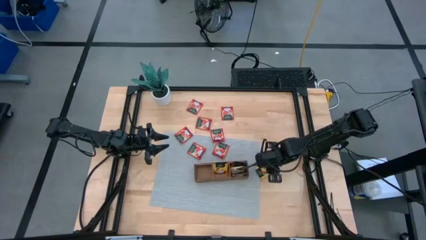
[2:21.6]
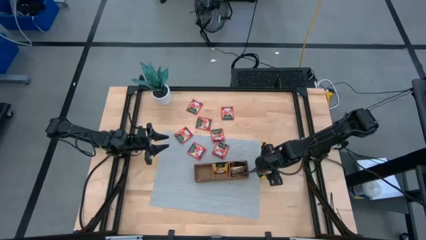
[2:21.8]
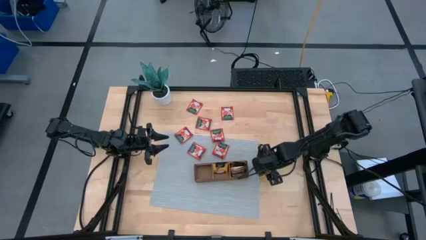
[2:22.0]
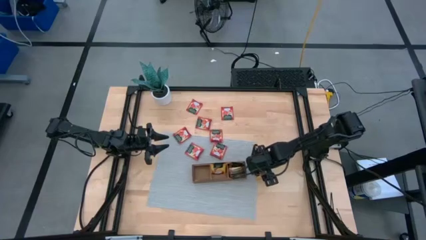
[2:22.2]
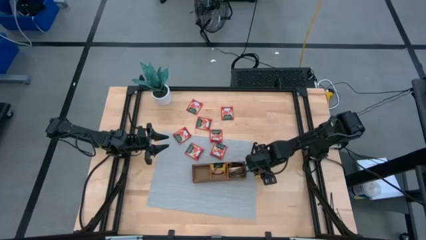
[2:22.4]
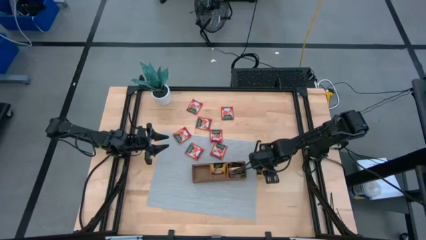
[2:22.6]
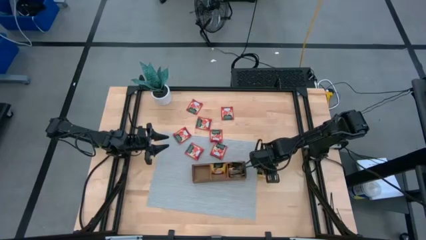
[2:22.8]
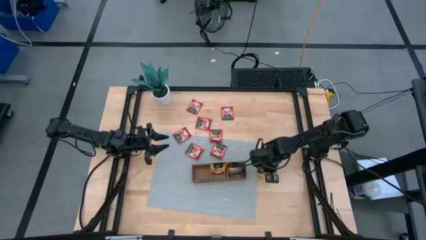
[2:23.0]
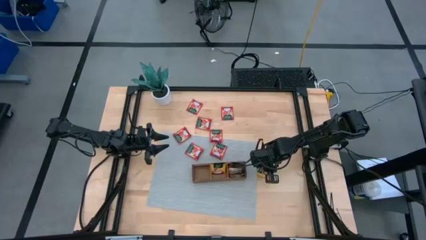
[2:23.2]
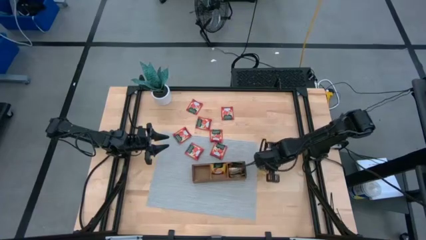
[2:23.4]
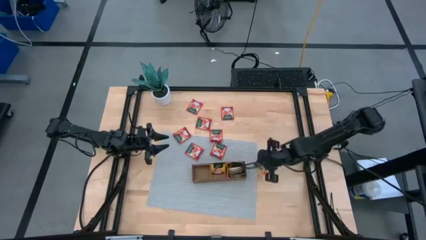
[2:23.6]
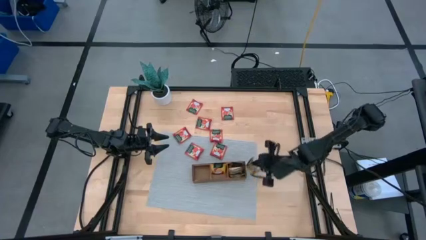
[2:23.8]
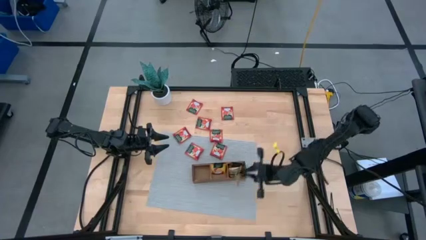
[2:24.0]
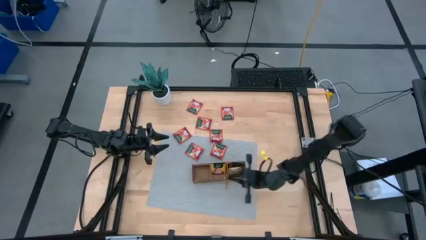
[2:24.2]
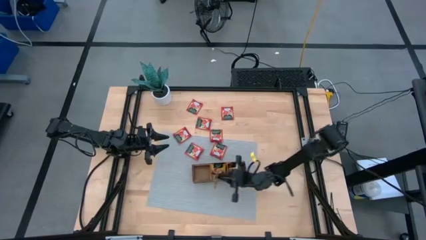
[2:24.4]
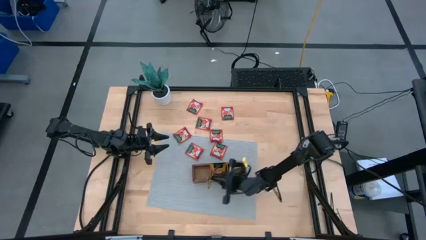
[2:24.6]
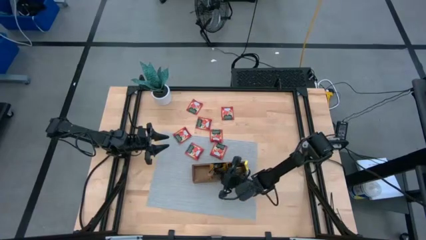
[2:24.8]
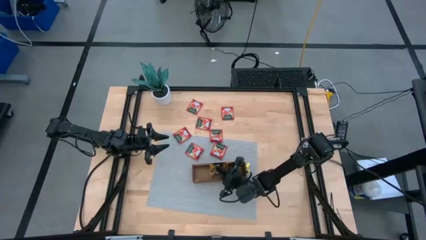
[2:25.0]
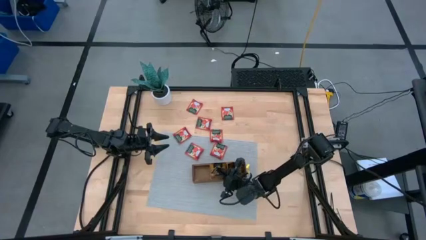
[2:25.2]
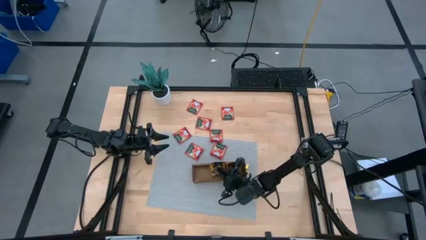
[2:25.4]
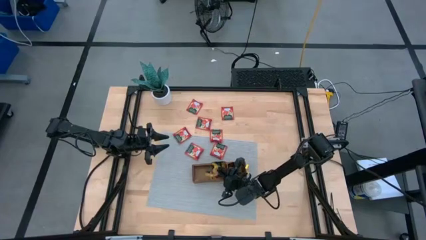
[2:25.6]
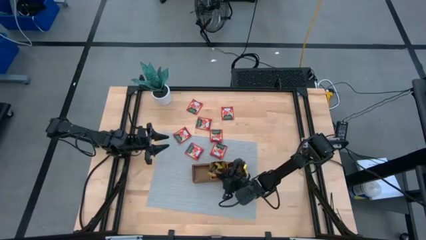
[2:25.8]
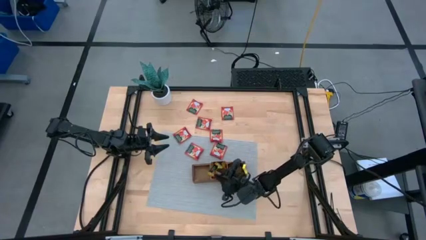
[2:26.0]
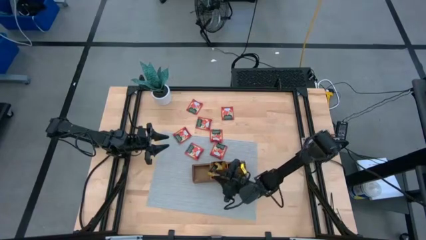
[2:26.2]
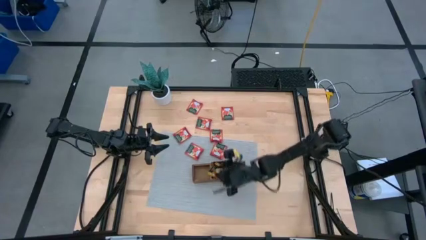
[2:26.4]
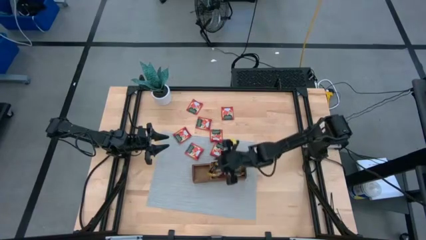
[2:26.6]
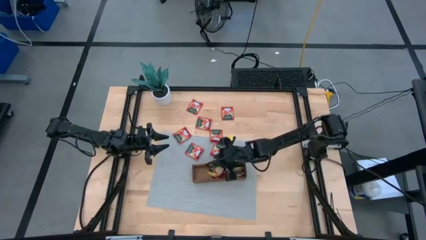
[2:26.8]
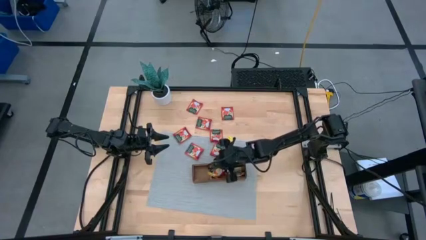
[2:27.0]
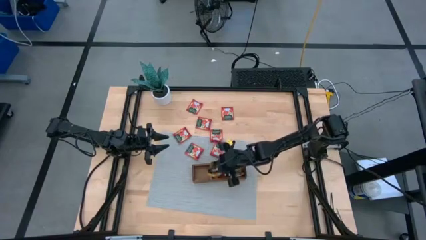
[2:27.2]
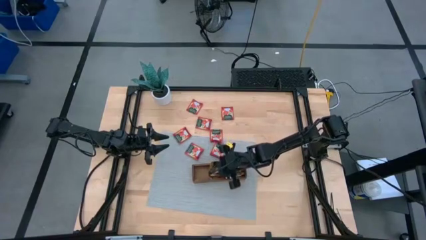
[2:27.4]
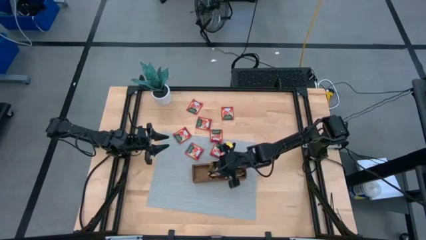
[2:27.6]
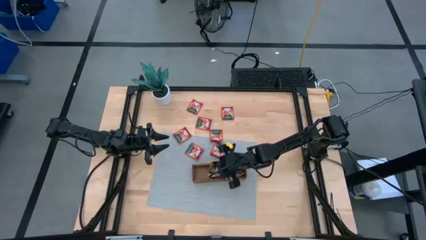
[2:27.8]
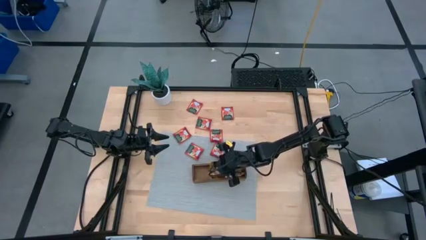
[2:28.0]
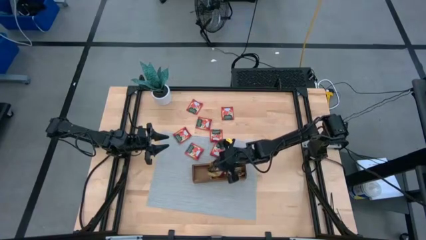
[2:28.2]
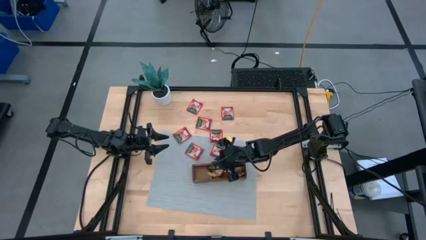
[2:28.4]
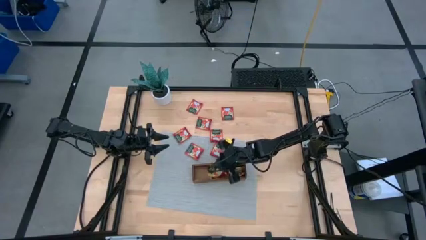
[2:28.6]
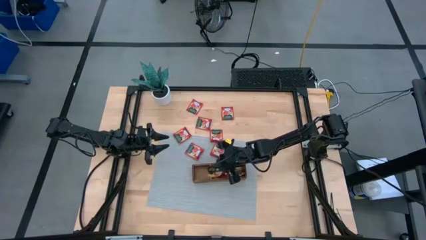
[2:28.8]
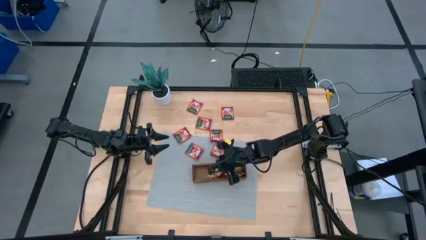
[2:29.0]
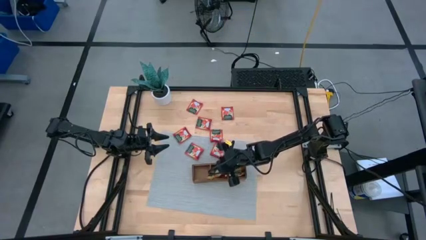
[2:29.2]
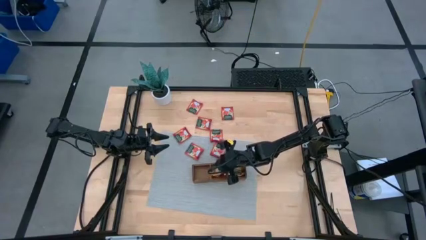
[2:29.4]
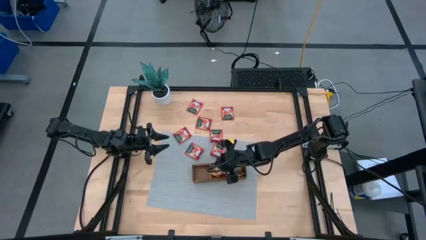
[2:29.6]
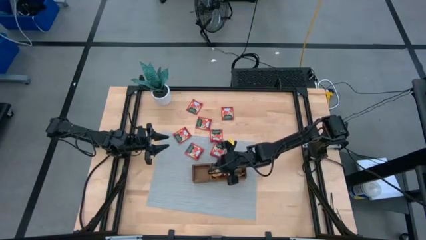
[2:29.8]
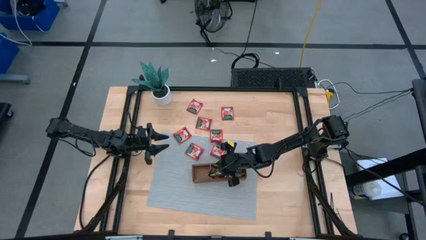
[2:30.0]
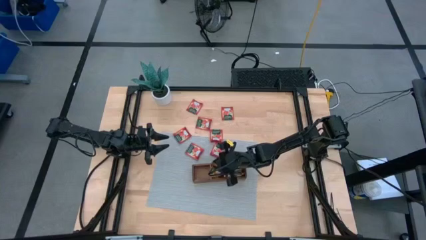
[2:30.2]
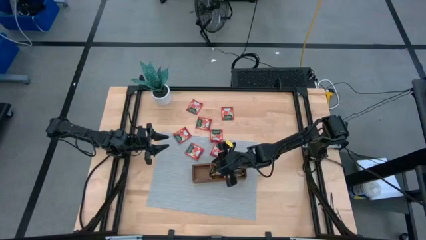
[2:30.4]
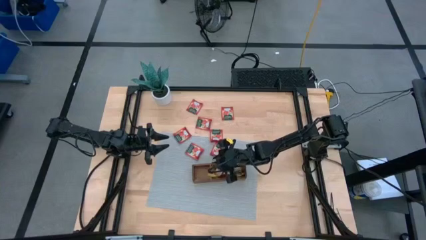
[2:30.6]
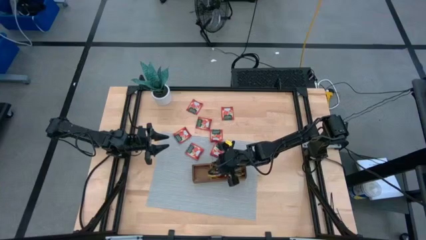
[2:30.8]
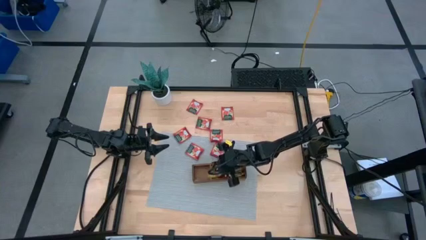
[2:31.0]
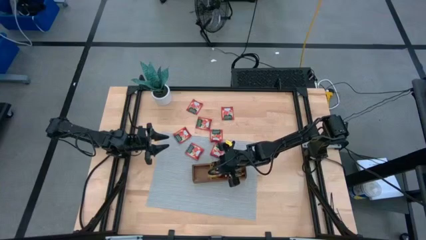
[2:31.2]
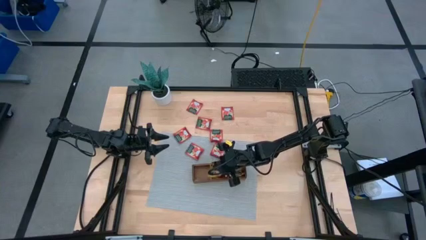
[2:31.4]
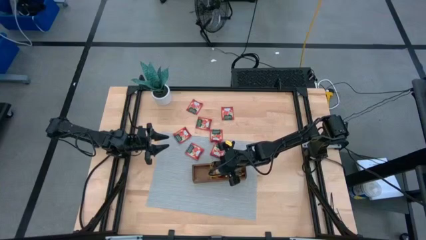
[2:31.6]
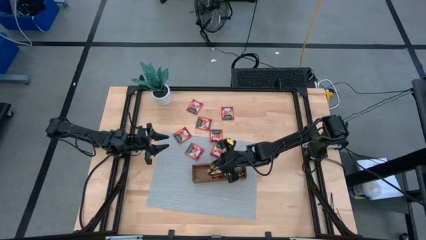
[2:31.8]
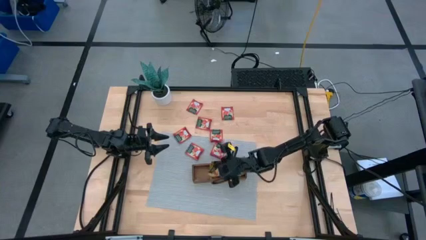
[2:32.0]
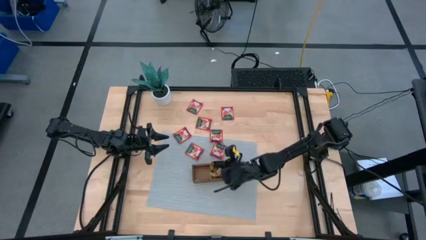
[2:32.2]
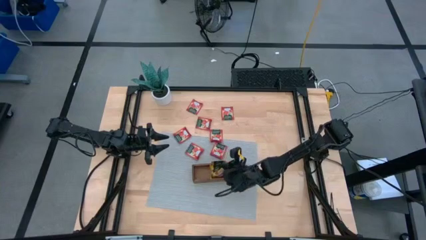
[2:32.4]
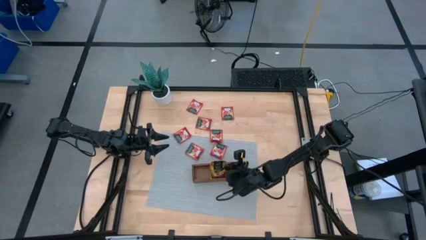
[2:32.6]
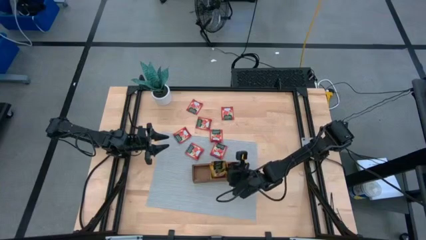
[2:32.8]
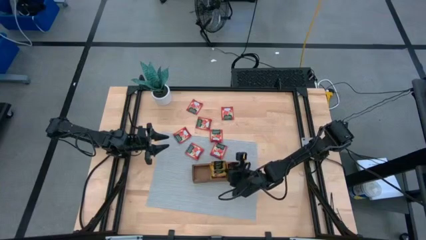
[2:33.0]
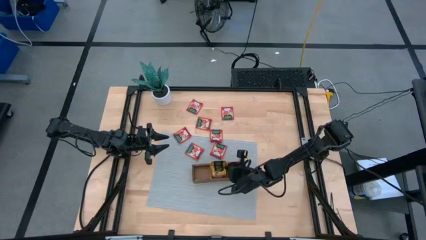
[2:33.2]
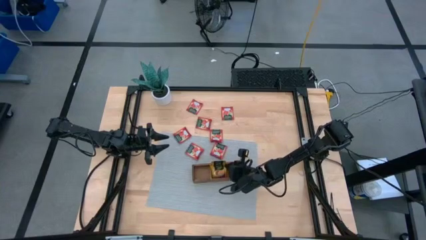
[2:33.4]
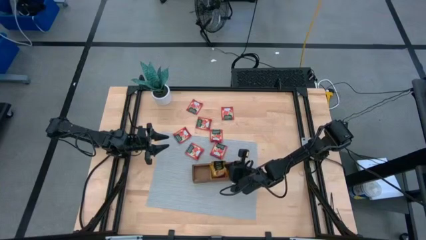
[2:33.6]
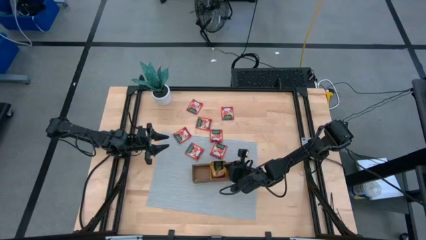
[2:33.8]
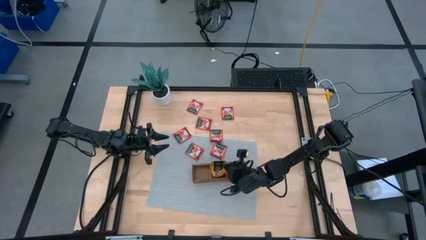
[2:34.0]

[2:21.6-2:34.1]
Task: Pick & Place Tea
Put the yellow tea bag into the middle compartment of the wood organizer

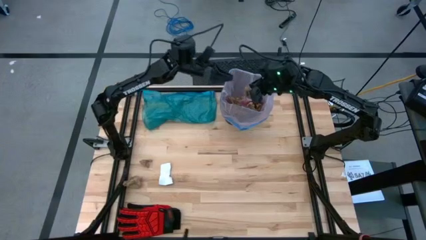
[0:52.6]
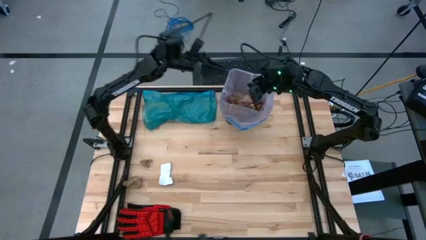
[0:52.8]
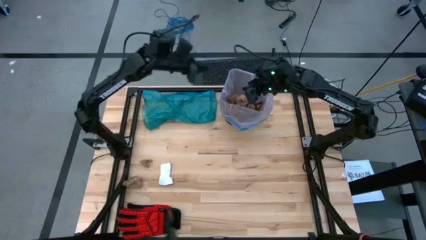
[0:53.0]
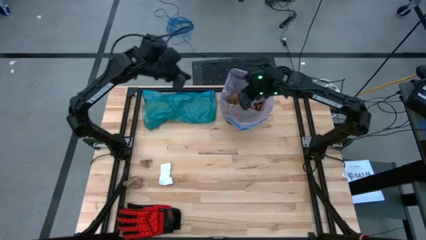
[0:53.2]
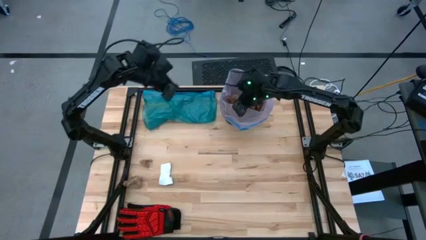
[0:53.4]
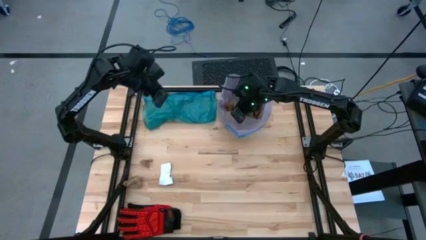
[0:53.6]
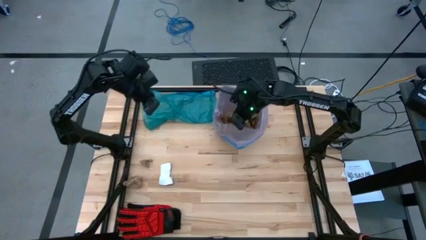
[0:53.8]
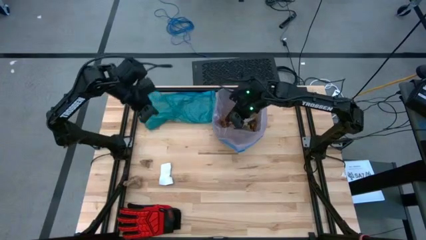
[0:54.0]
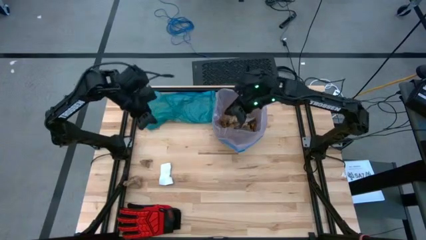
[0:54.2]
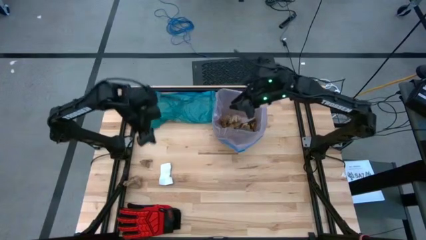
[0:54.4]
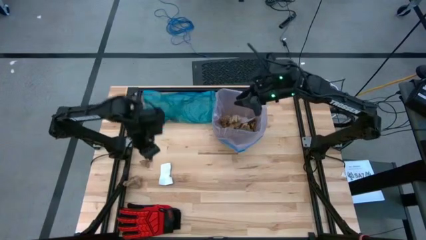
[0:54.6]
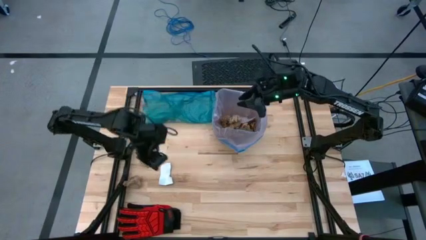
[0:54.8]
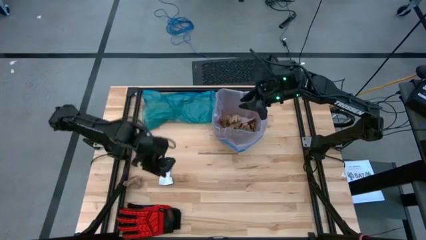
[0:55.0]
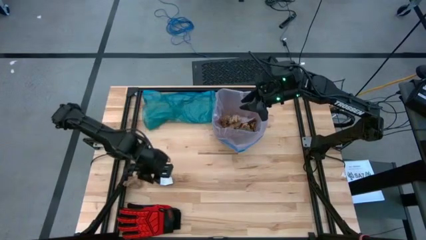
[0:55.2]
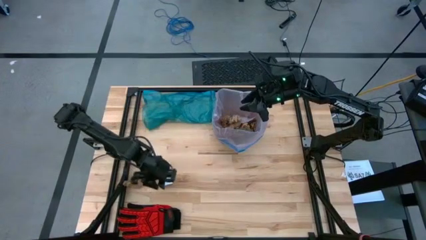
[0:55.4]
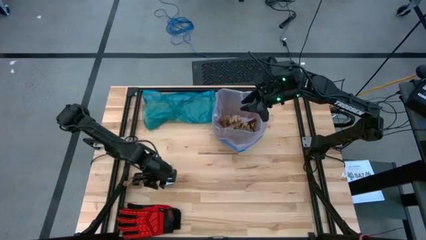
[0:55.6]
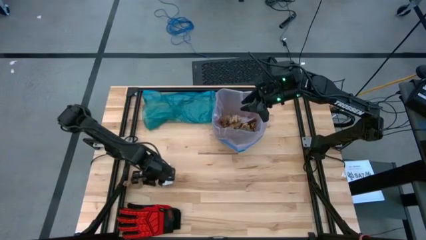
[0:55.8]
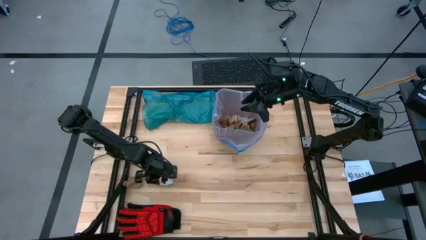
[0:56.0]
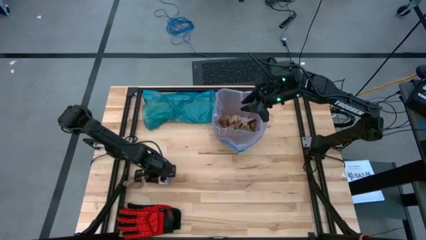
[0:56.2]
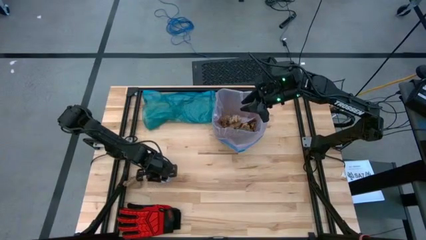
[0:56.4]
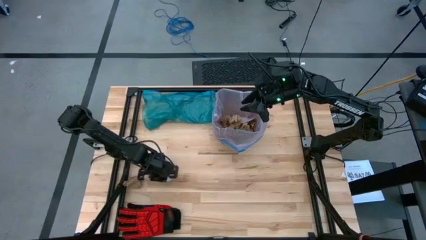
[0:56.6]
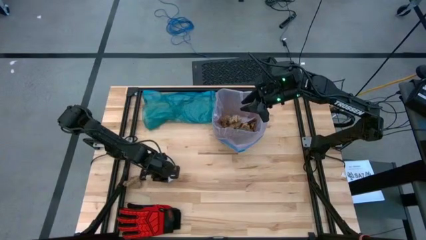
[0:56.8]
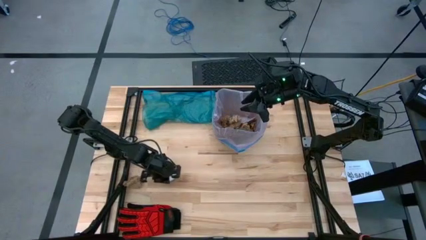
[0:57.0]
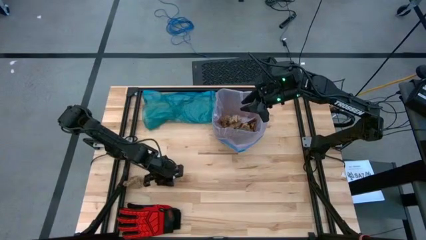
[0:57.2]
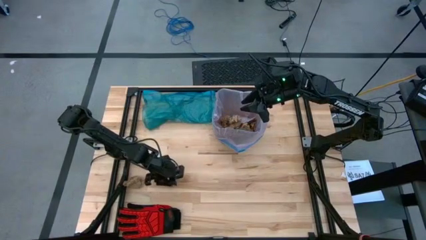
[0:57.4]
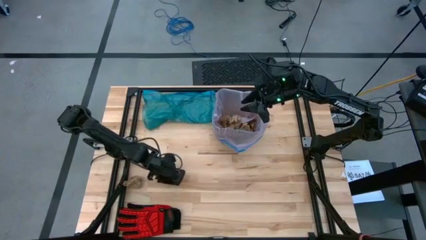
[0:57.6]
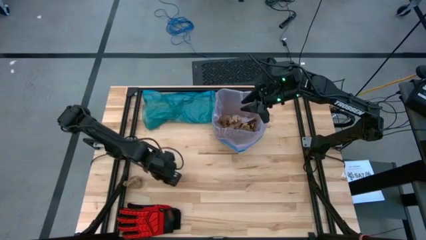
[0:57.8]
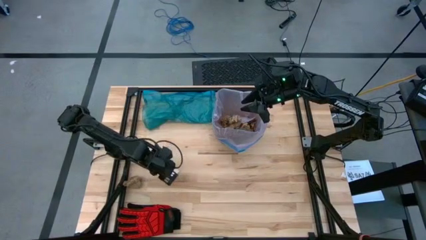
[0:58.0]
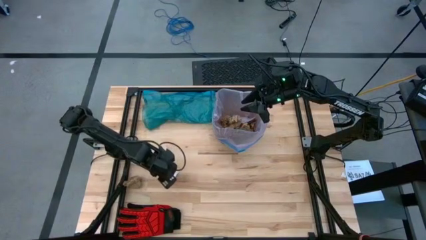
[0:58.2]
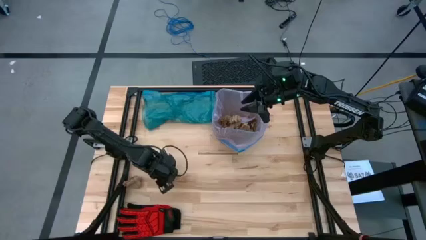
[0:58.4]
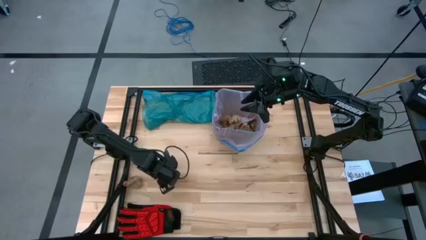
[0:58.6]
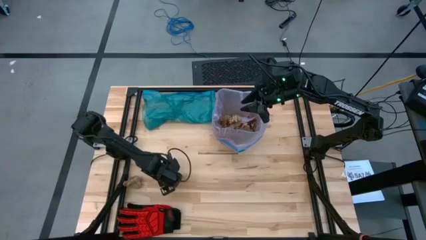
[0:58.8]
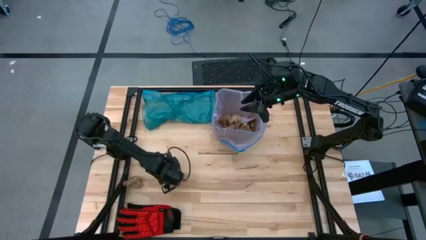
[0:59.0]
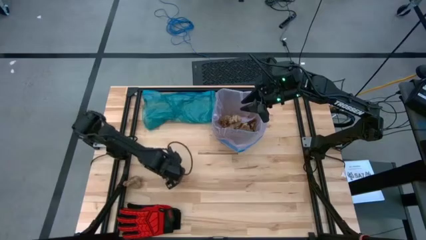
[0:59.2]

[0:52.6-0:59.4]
Task: place trash/remove bag and relplace
Put the white paper into the black trash bin
